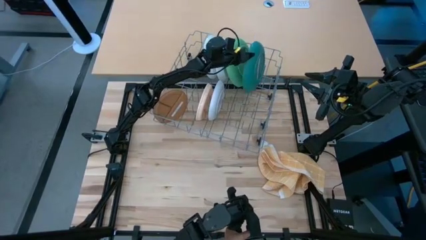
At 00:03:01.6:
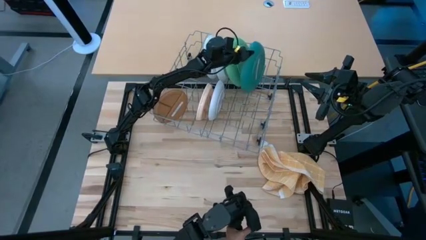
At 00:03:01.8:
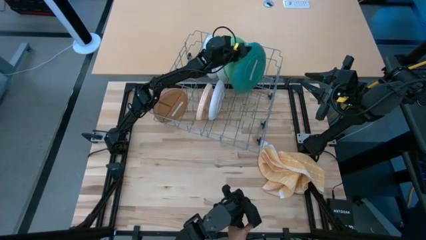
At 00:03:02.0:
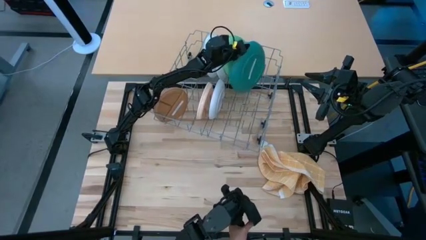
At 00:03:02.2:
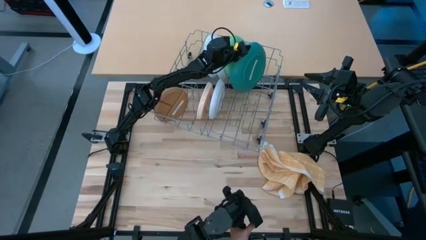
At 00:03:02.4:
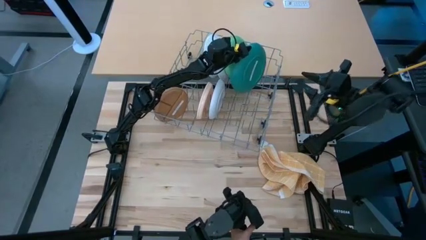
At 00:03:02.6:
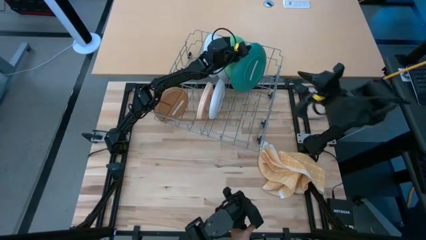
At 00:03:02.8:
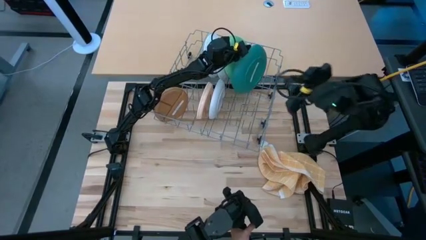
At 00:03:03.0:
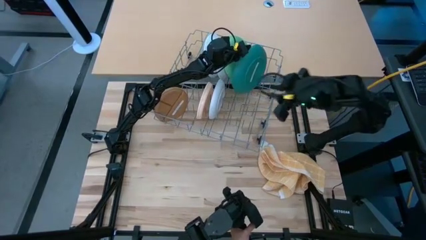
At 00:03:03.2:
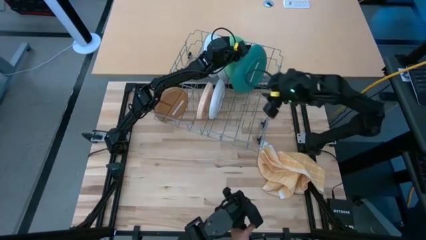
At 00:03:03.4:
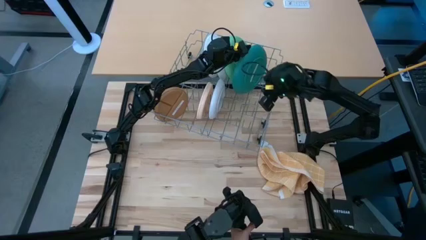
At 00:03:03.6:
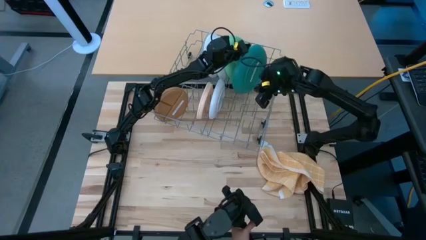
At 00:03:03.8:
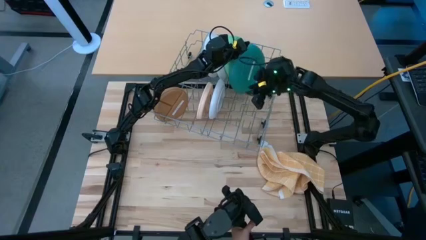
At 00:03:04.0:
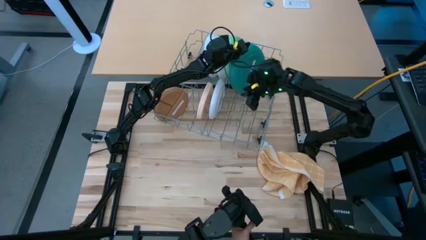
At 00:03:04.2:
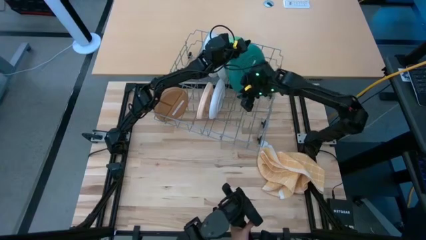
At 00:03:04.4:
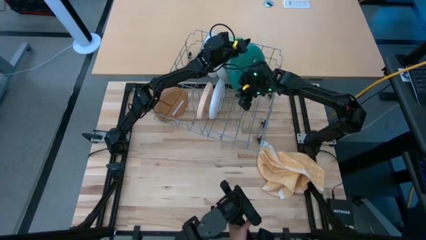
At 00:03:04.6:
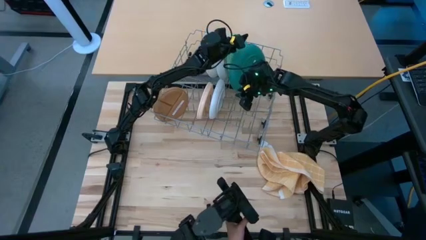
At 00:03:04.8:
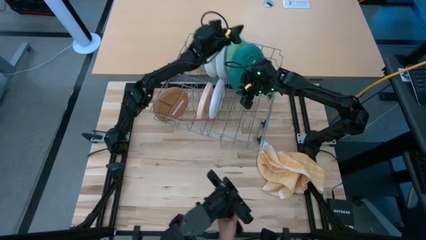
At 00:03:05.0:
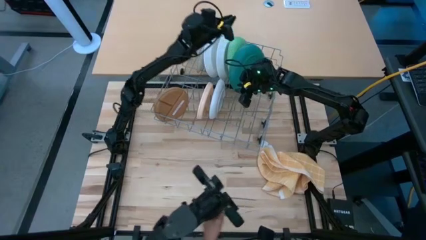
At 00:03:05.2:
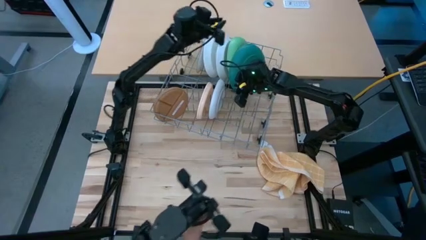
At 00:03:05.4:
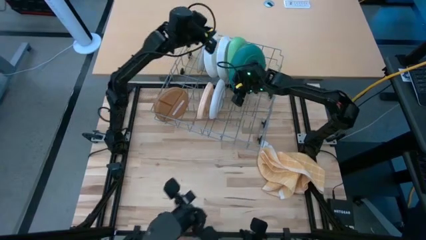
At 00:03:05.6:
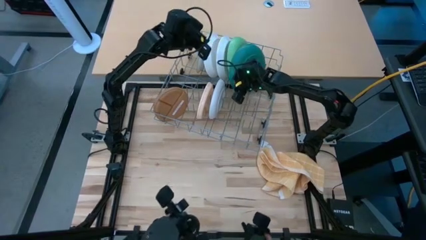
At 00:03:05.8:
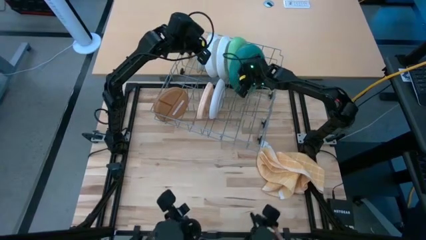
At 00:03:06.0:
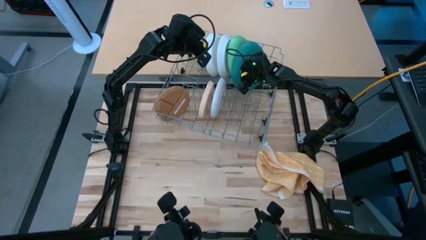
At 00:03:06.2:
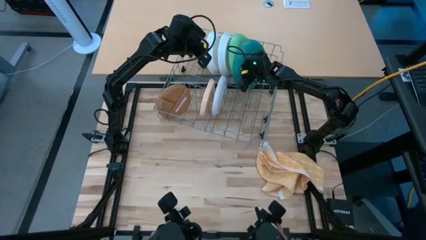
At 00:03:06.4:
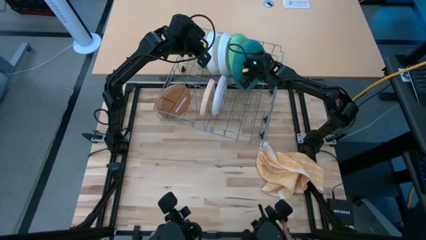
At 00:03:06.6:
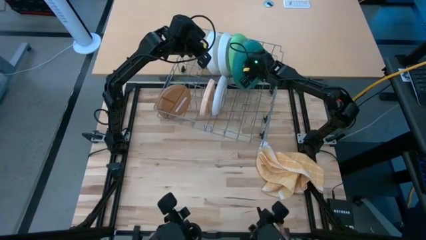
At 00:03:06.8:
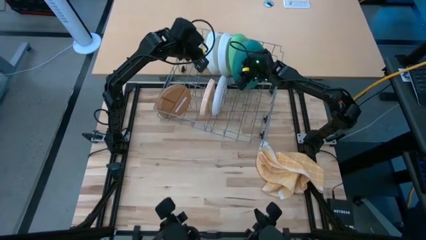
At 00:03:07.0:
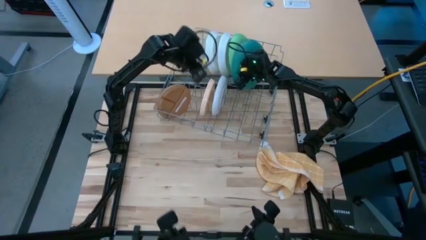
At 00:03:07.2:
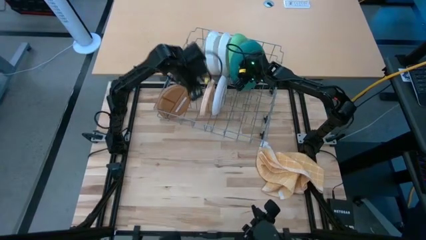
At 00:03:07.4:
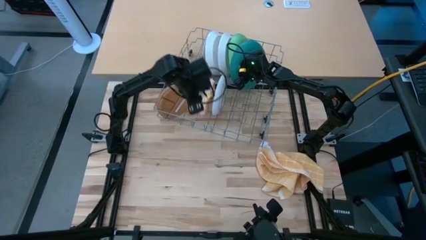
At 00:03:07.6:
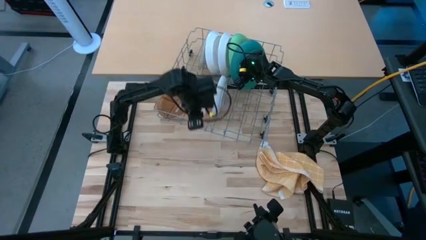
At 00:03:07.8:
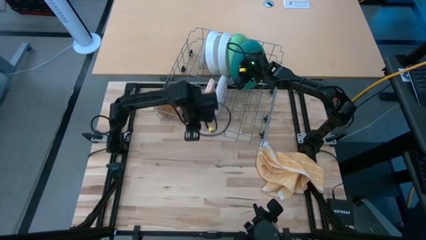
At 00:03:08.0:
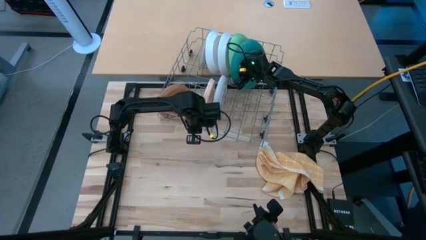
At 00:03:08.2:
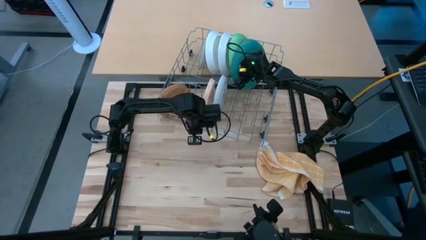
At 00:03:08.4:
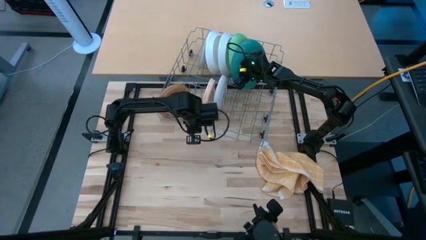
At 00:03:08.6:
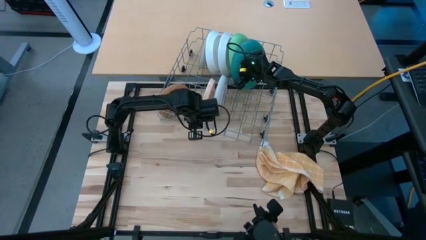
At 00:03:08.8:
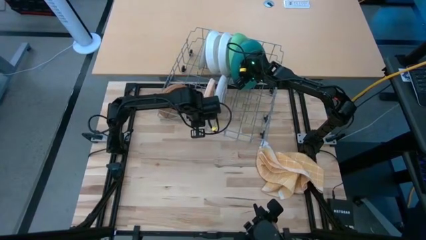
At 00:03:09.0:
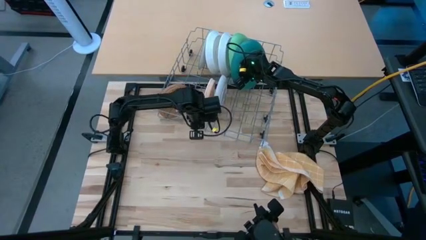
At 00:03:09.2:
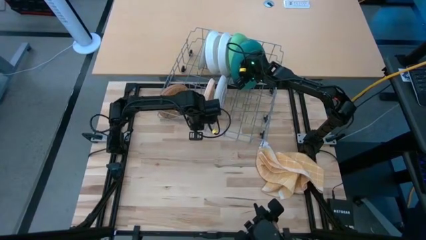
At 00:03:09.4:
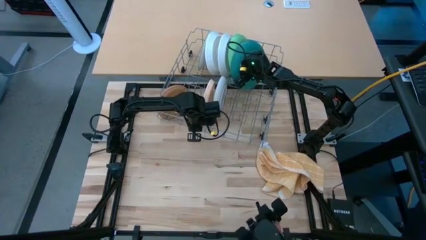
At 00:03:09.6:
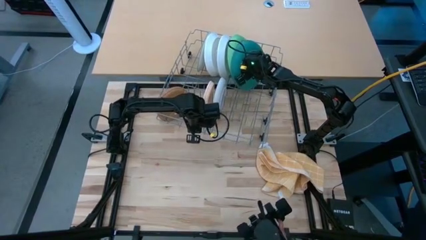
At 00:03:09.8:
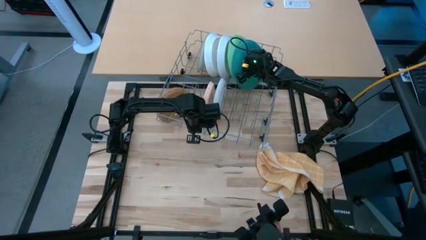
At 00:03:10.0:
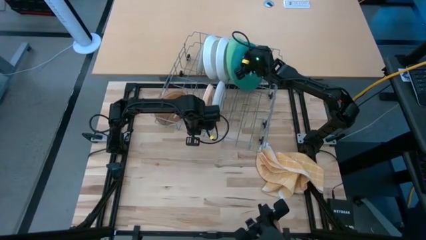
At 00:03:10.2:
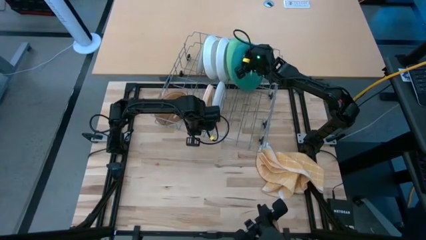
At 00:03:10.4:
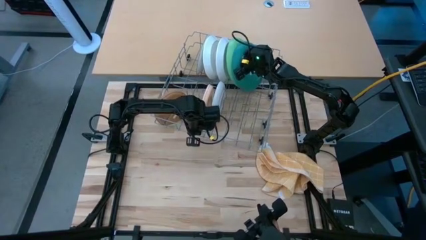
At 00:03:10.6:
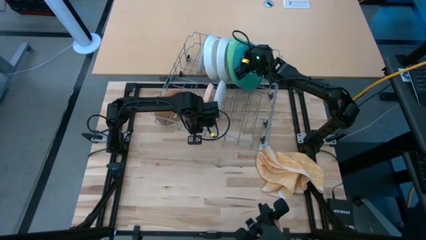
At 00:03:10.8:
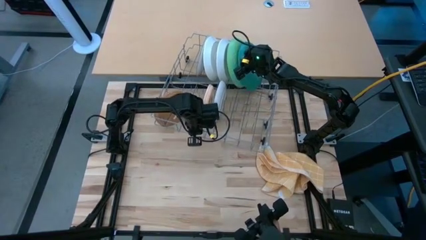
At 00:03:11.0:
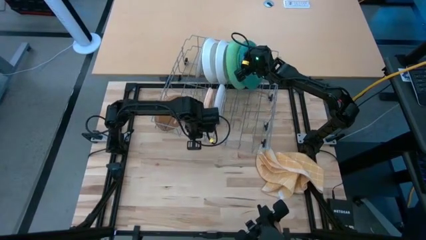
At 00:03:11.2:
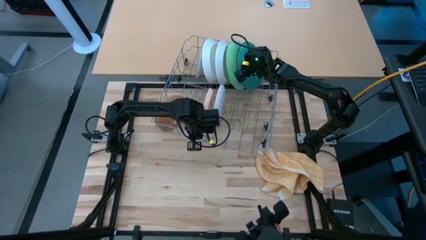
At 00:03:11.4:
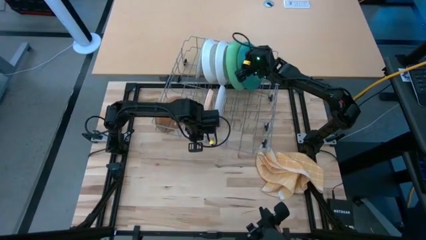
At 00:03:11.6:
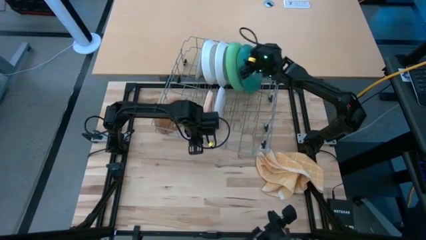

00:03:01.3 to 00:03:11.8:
Task: Sort dishes
Put the dark green plate in the dish rack
